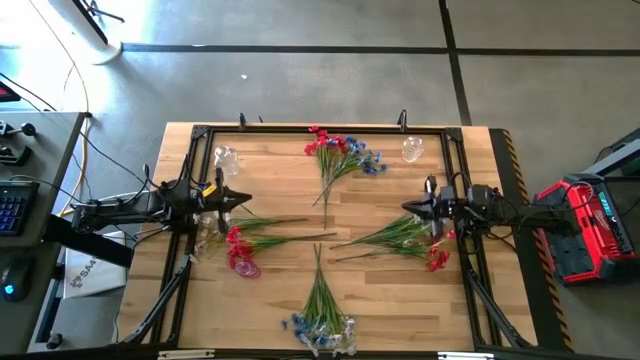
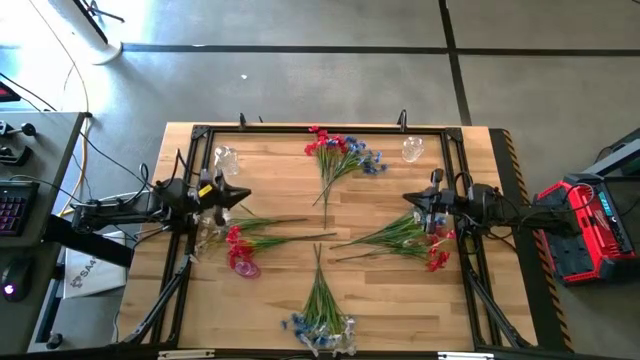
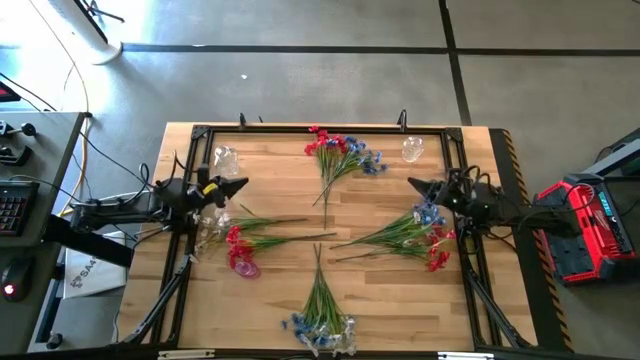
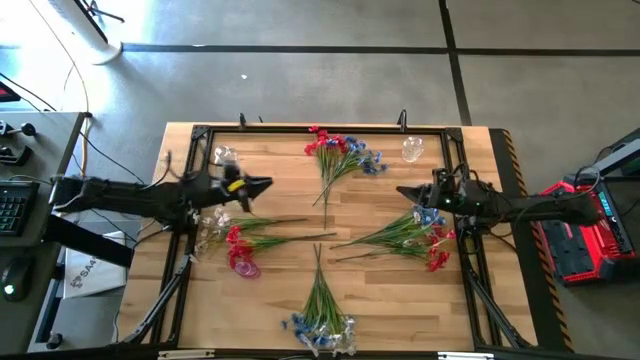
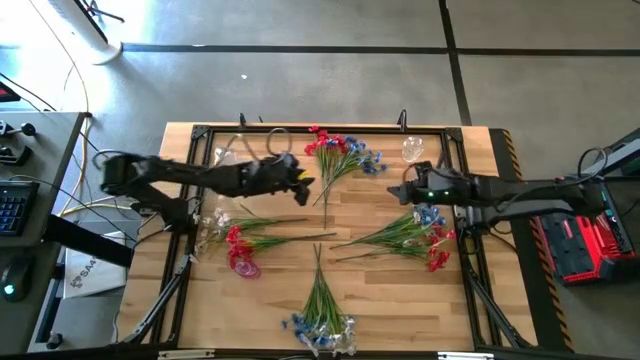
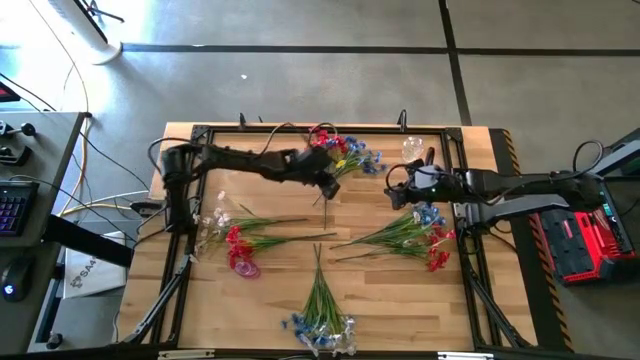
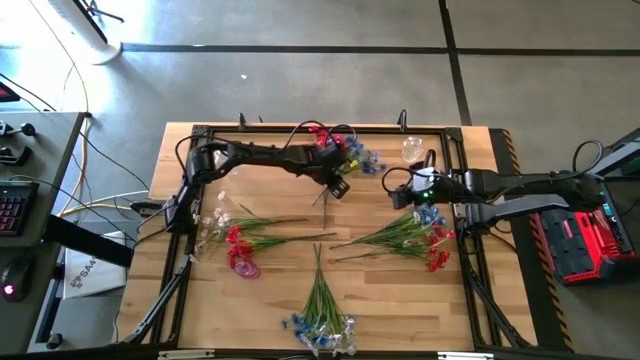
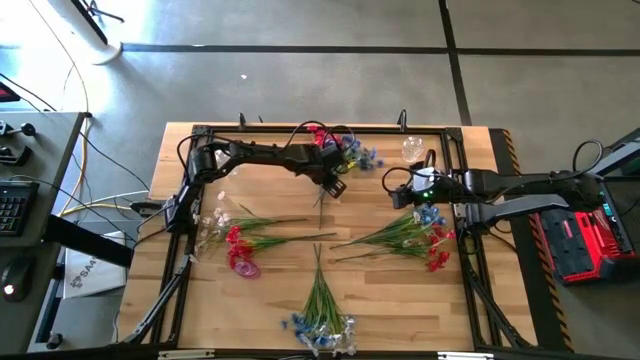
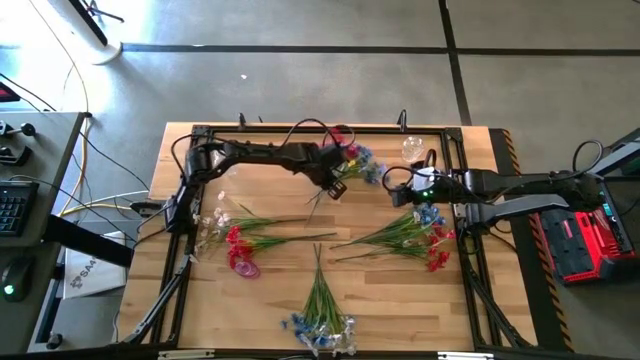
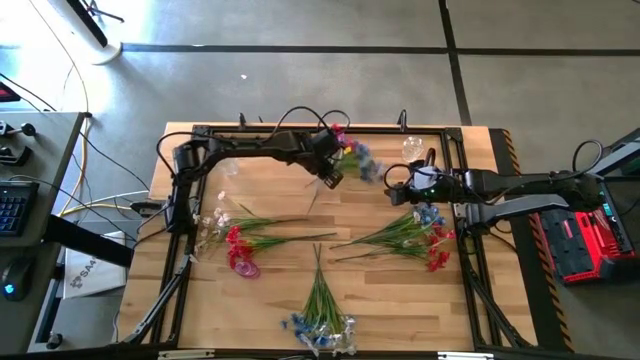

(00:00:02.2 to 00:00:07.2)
Task: Sort flowers into vase by color
Put the top blue flowers into the right transparent vase

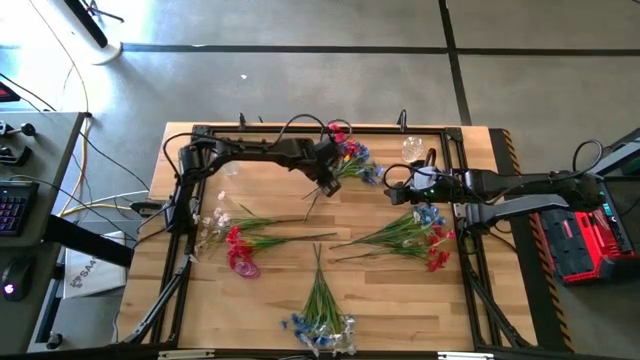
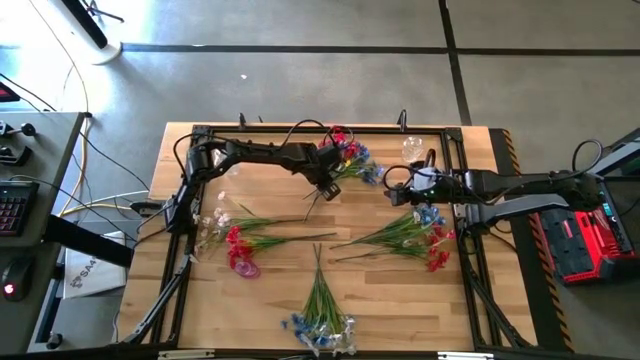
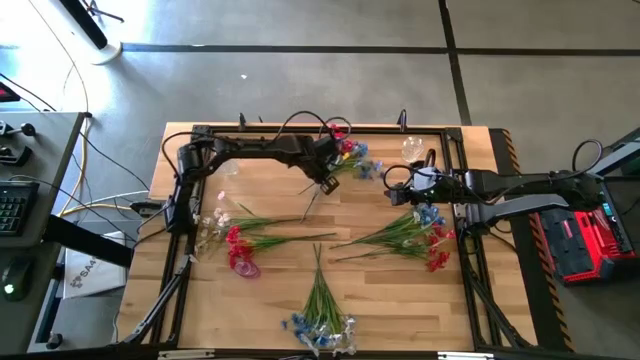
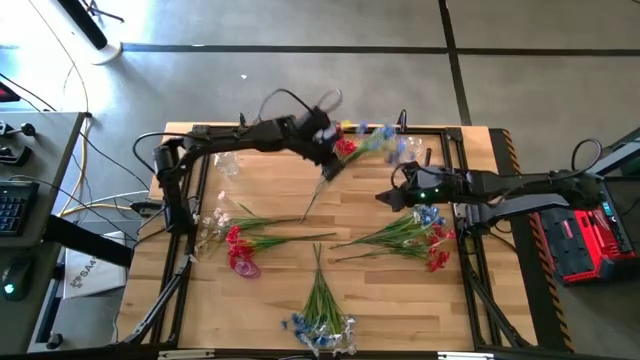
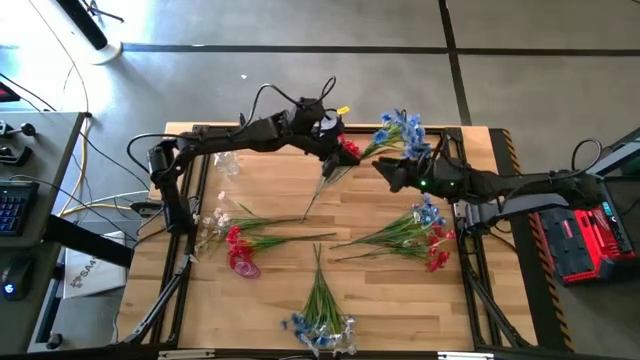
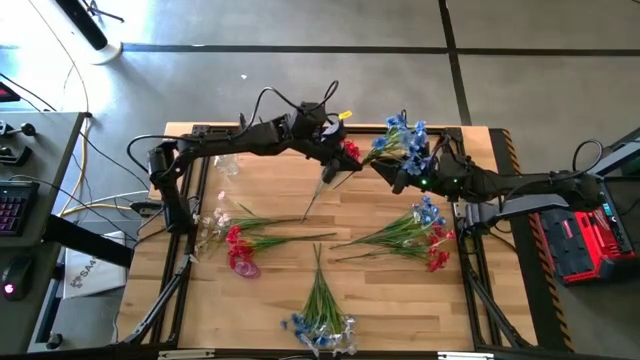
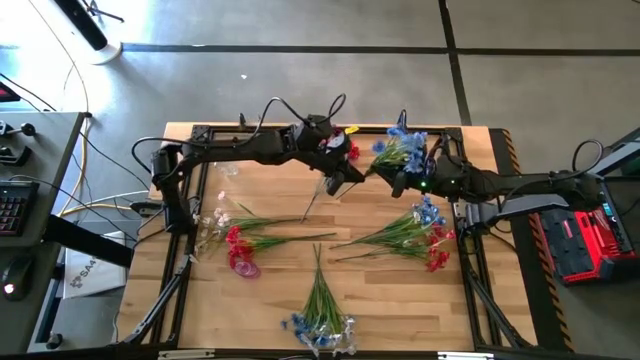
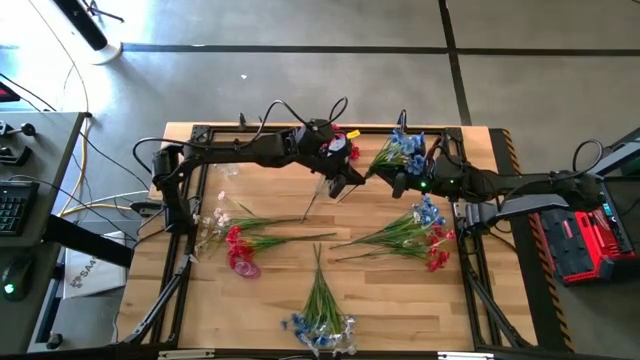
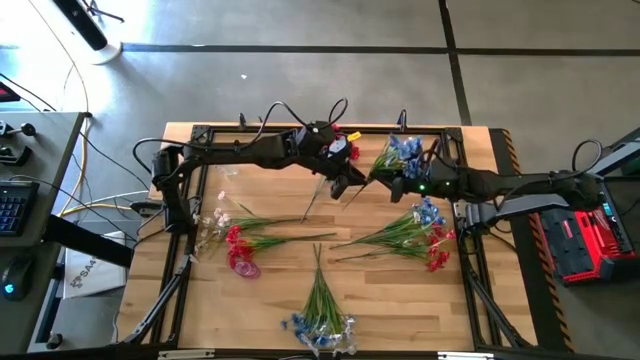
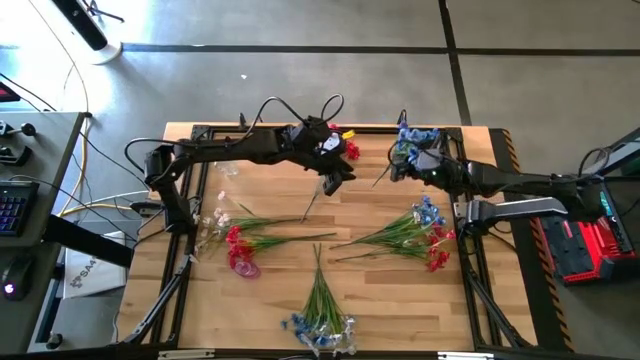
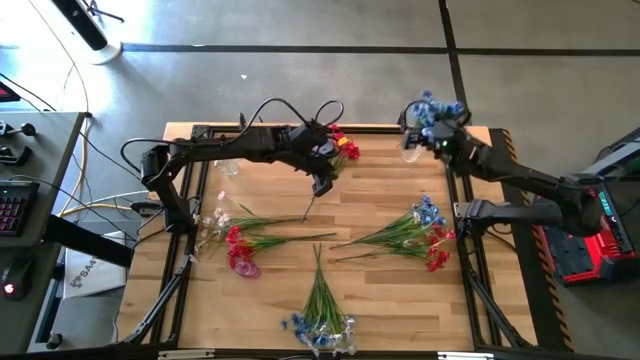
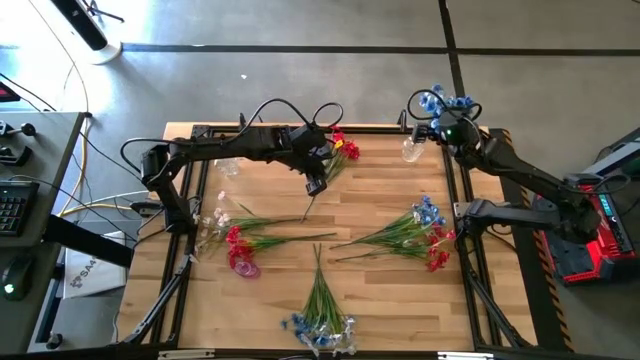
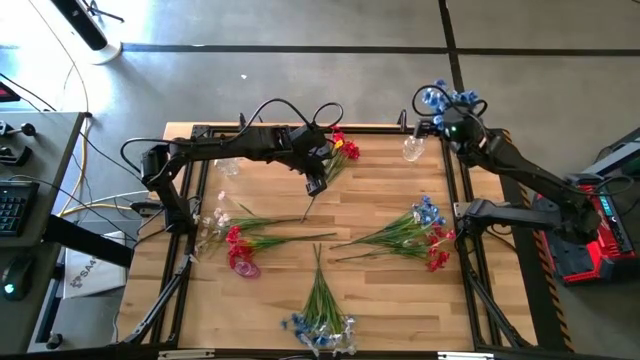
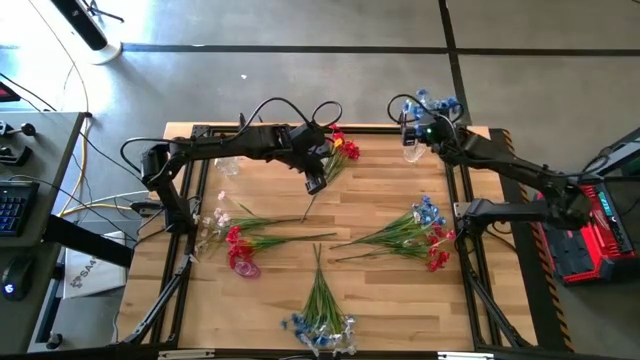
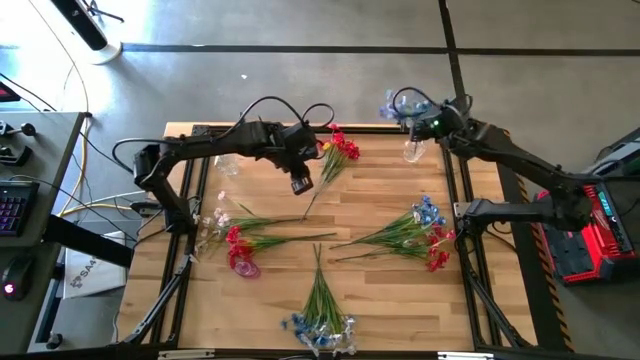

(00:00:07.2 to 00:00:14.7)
Put the top blue flowers into the right transparent vase

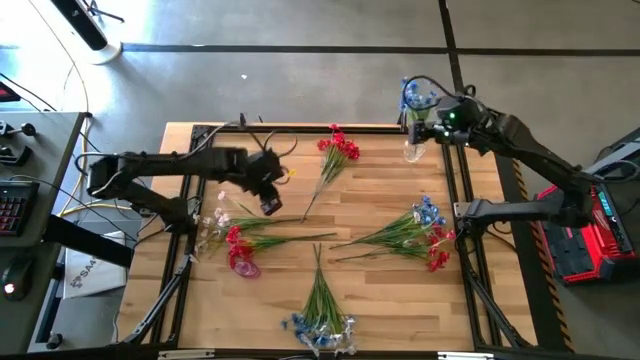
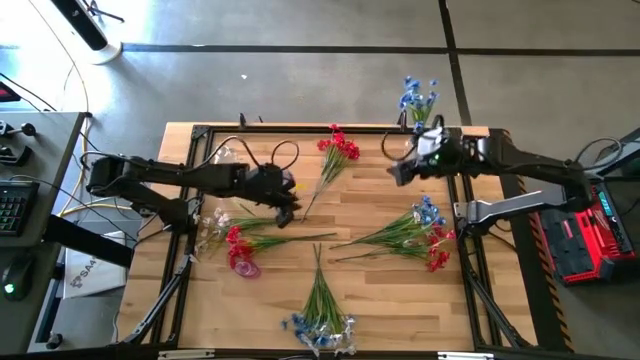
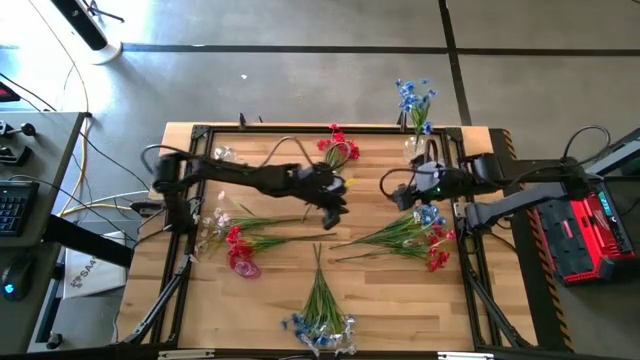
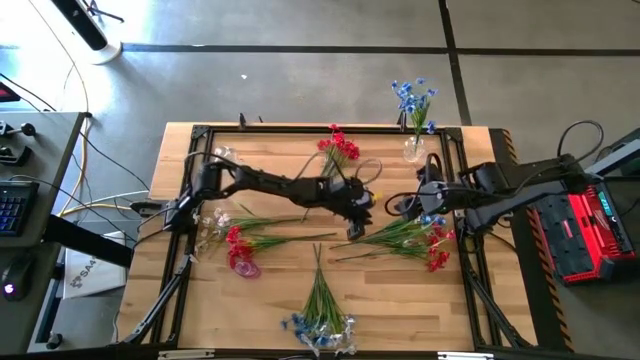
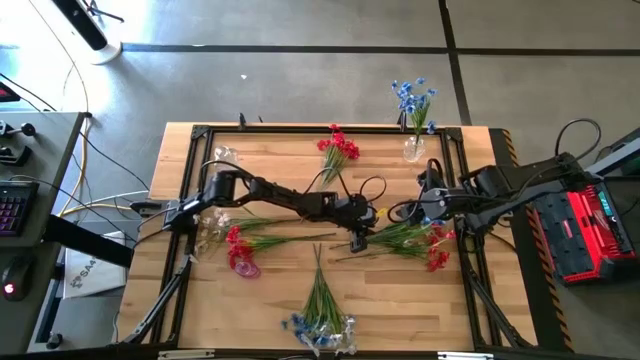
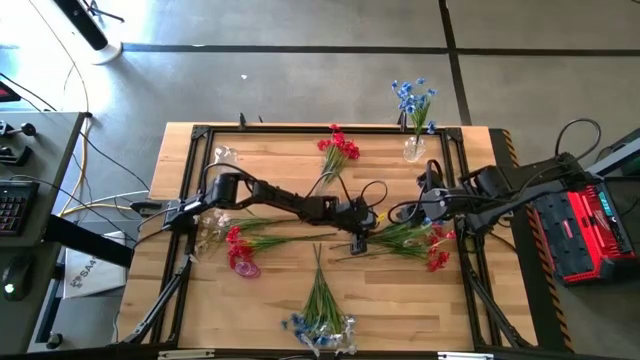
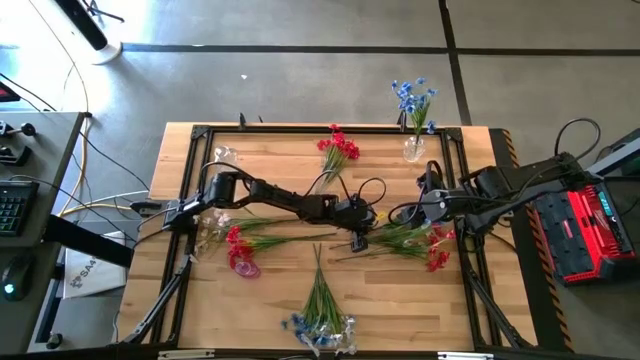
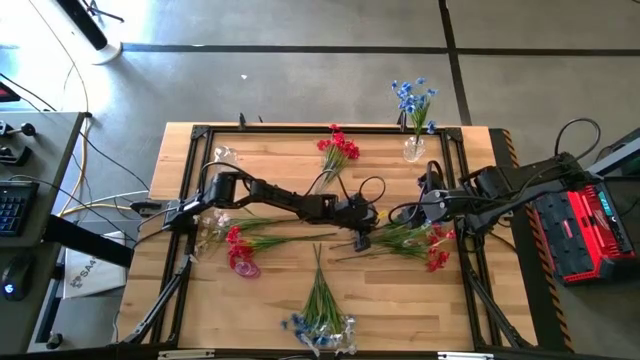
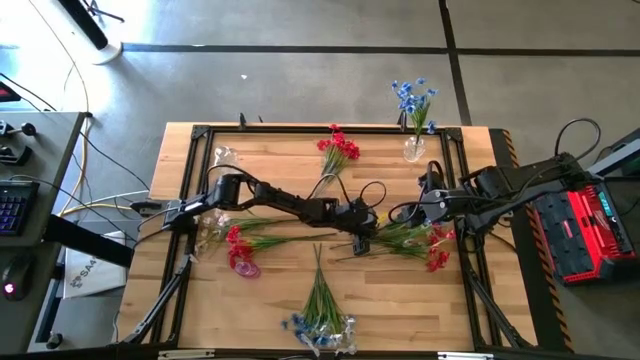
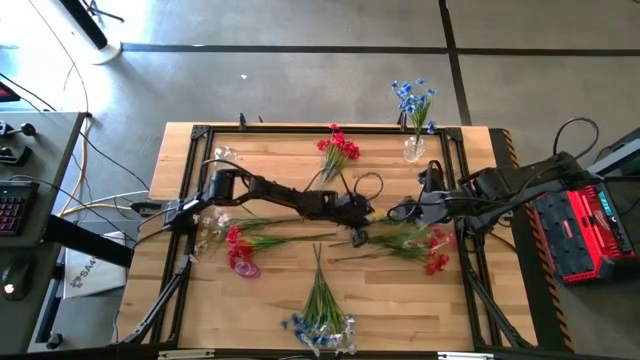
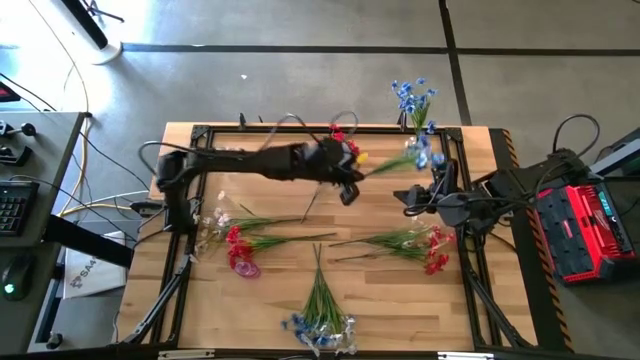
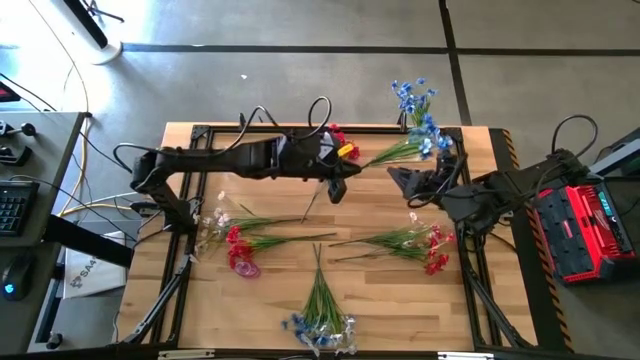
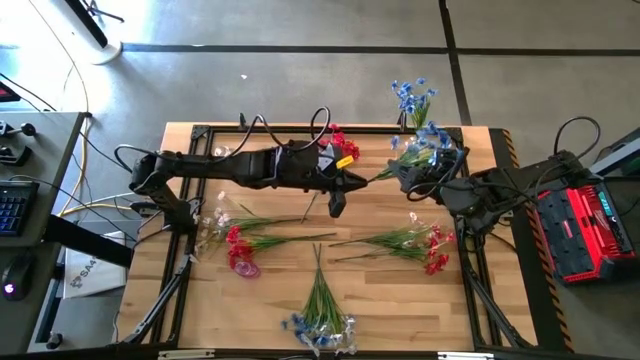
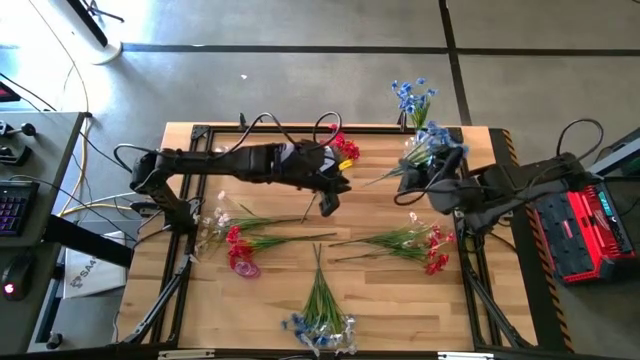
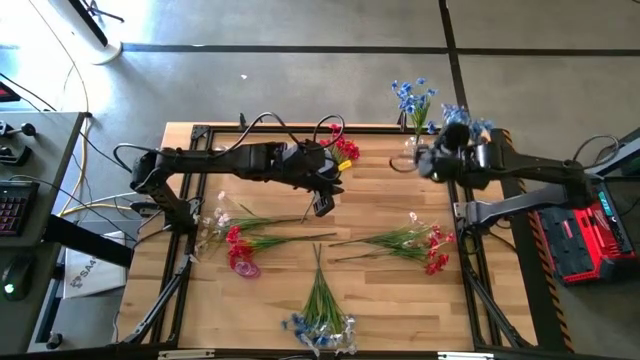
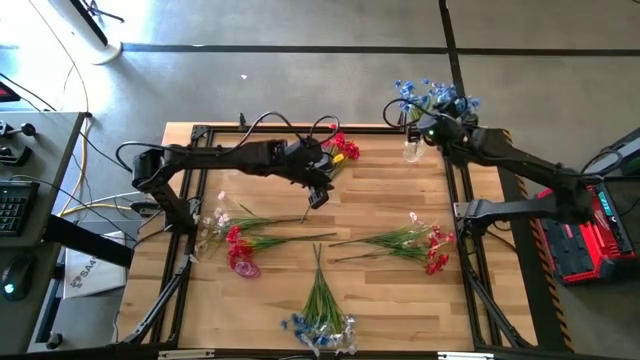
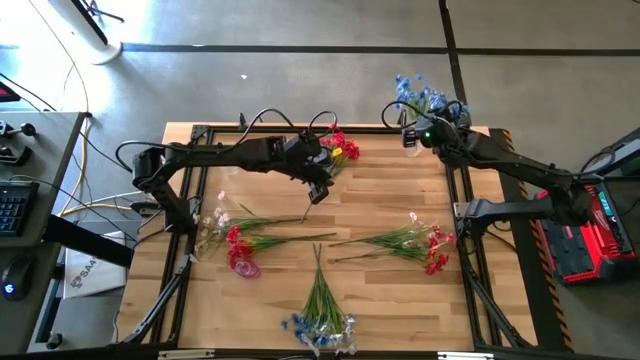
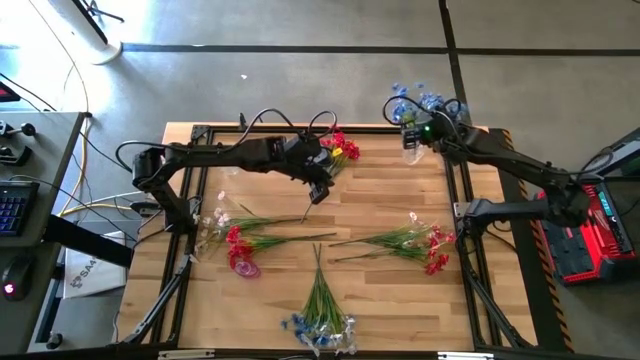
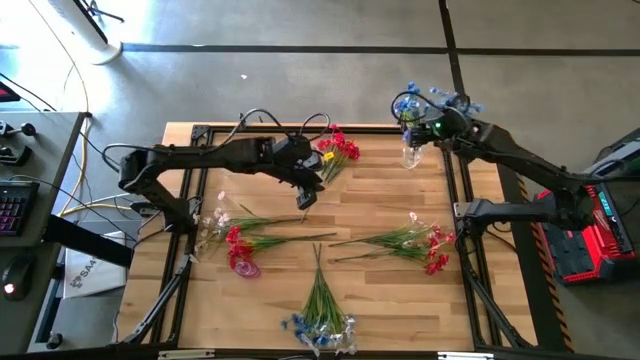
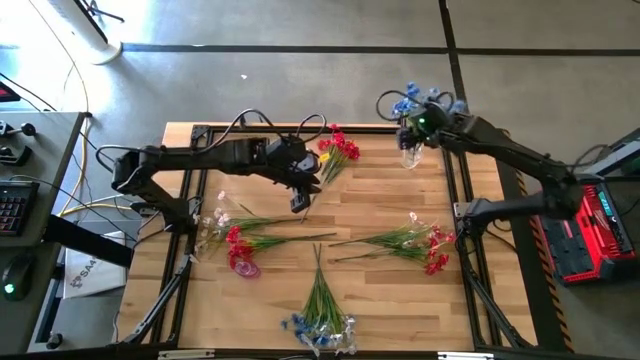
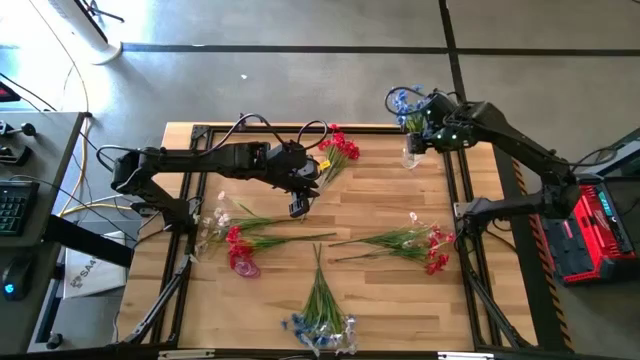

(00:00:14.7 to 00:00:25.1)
Put the top blue flowers into the right transparent vase
